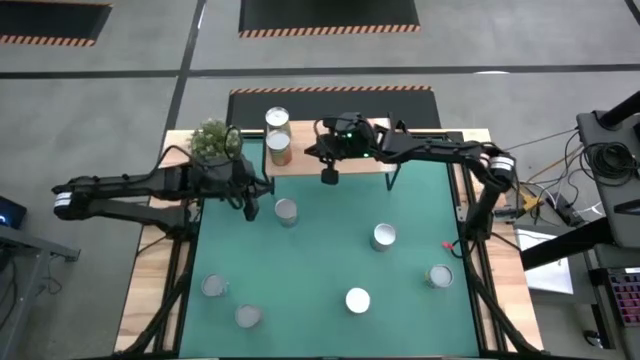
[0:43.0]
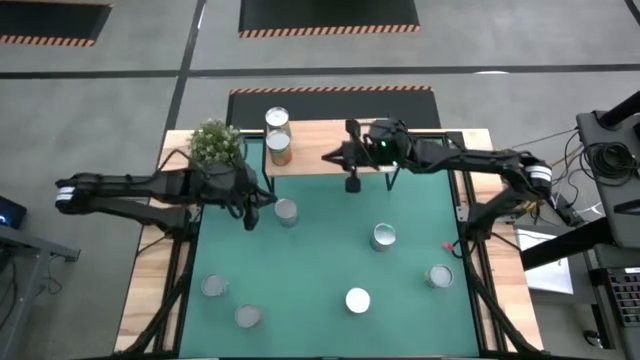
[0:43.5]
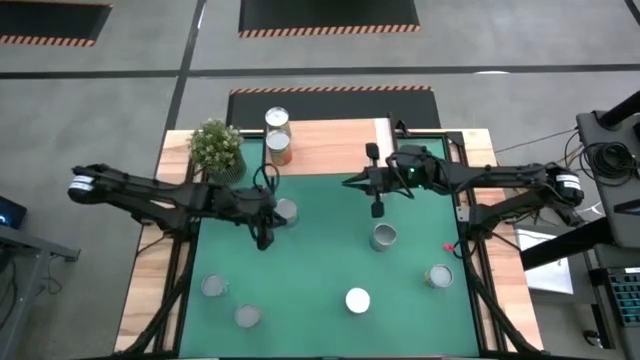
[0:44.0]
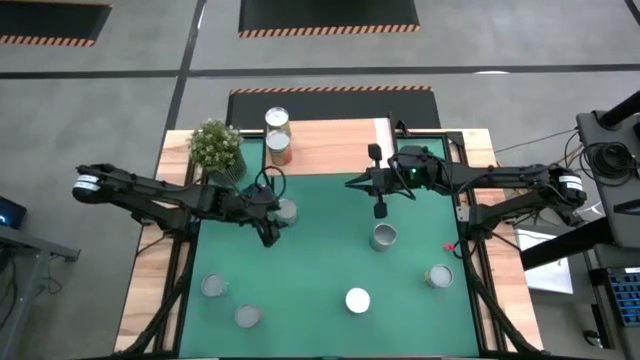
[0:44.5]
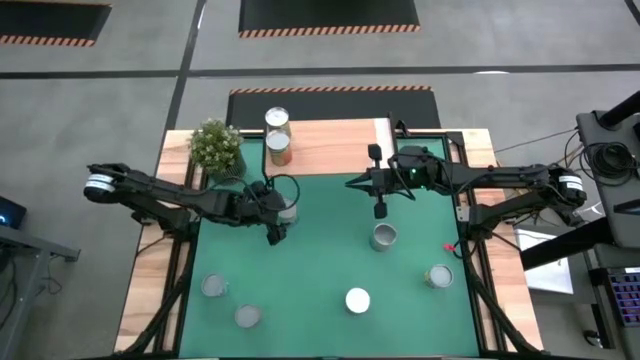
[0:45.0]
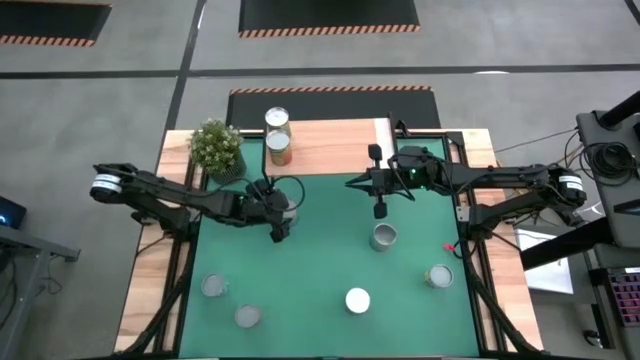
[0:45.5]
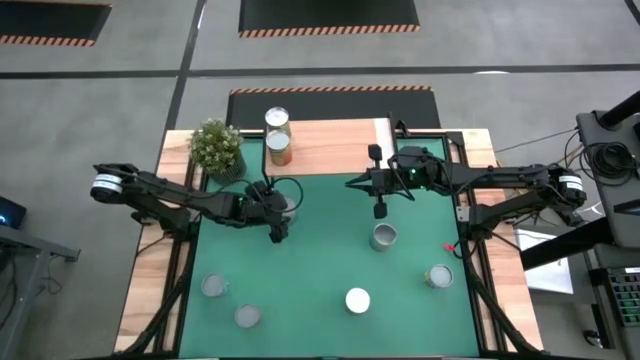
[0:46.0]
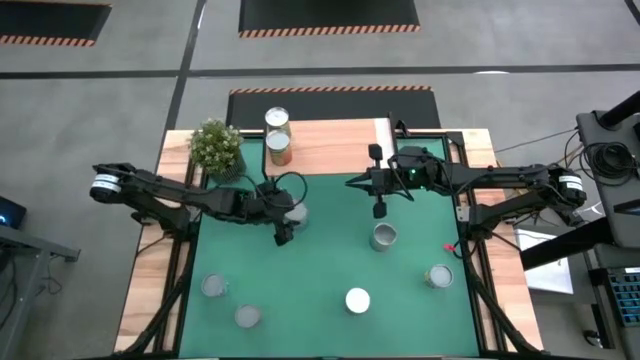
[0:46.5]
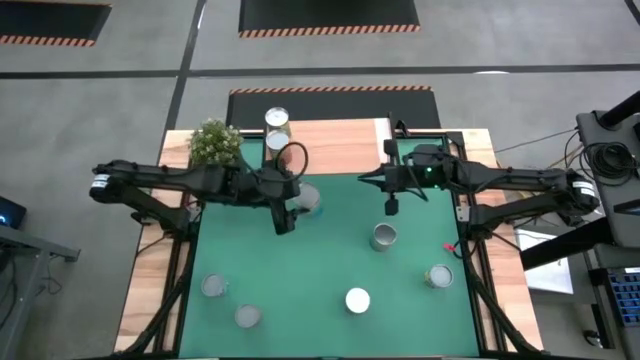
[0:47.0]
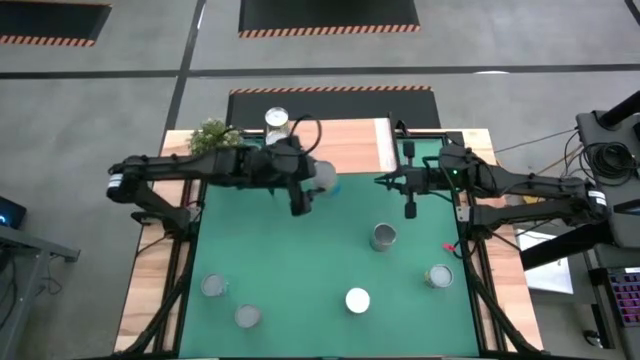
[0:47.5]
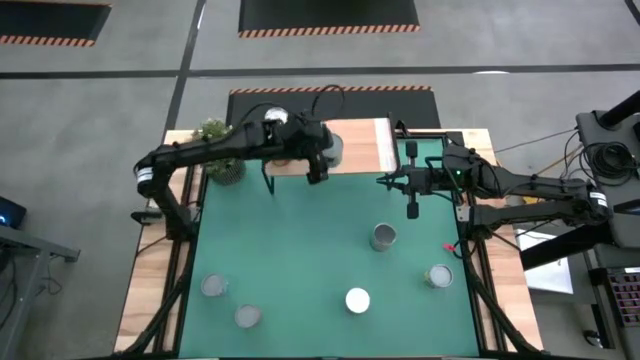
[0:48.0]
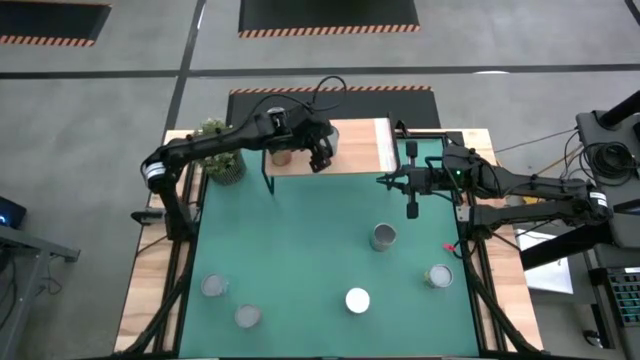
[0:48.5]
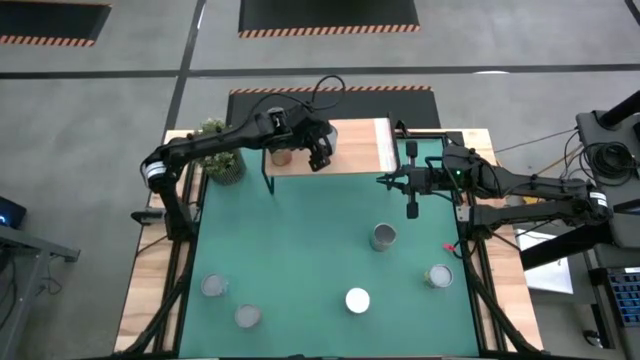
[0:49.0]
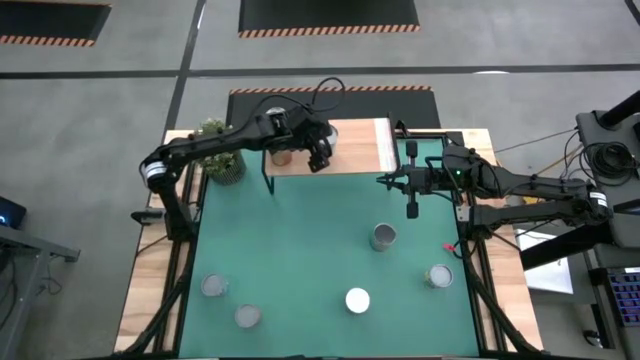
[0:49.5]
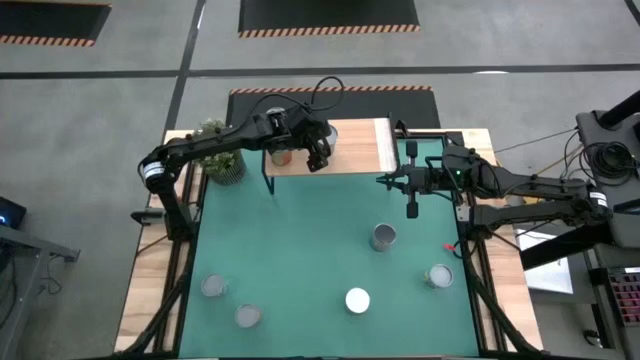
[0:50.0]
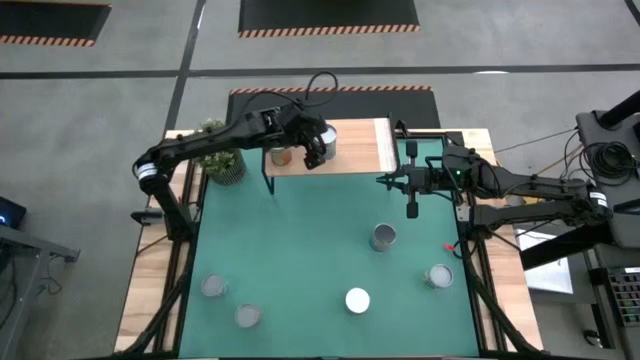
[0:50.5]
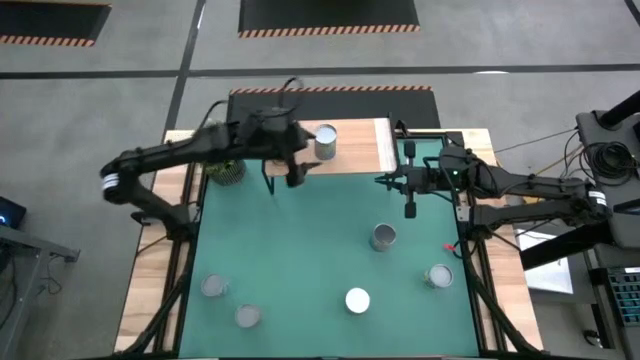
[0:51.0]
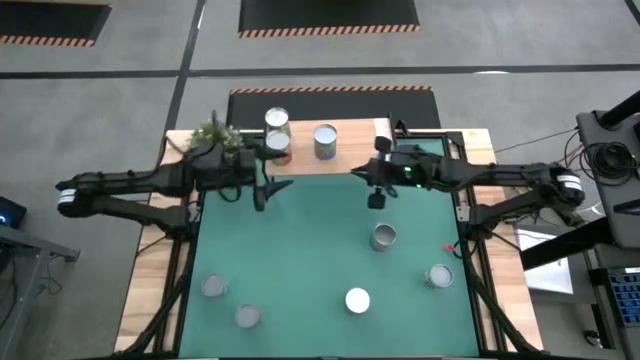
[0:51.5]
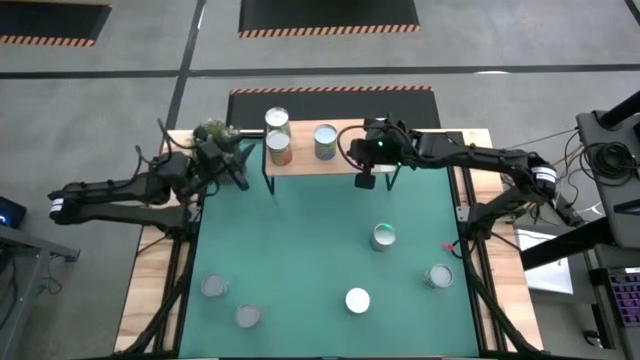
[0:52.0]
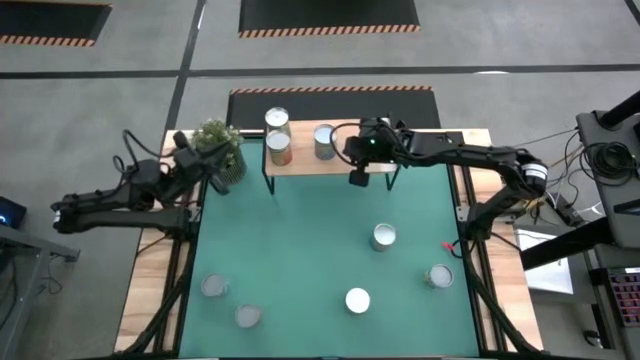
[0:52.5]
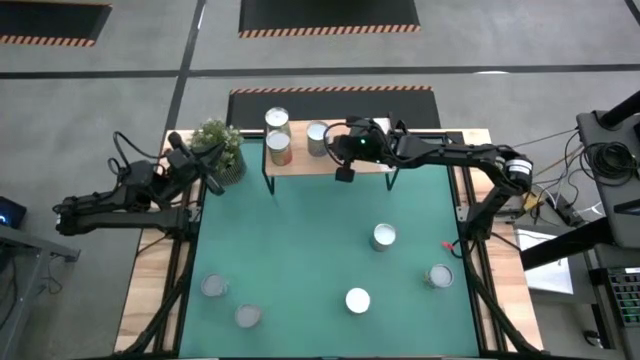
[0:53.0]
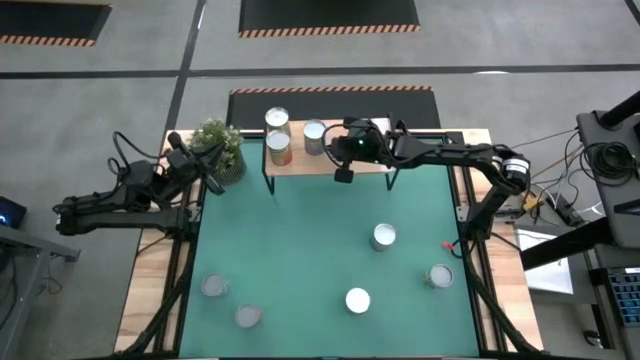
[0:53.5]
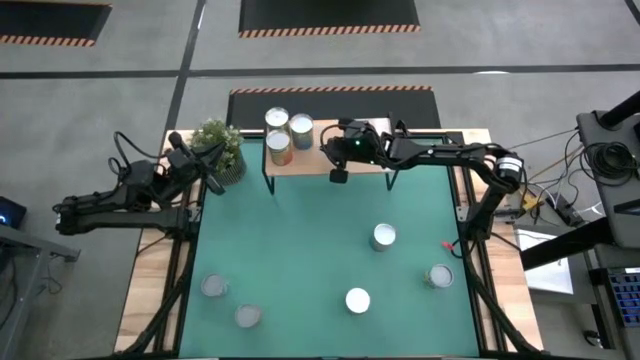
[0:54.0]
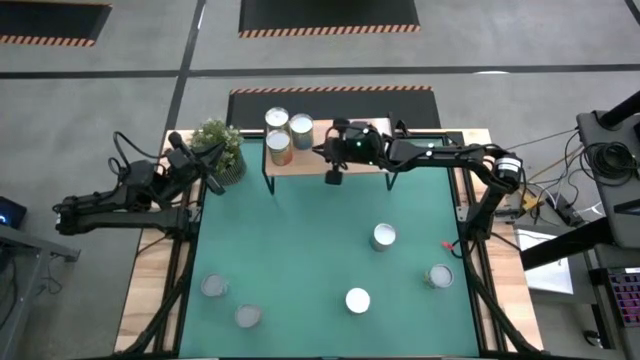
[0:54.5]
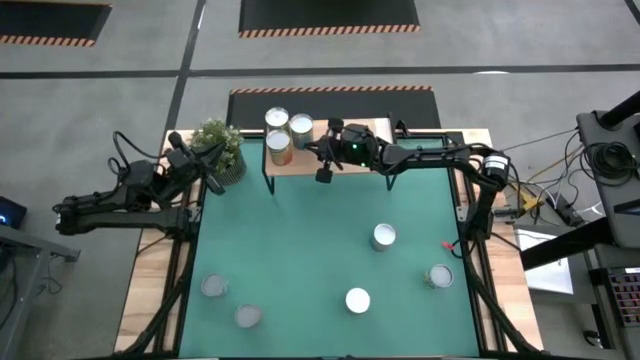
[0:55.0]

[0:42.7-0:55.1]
Task: Pick and place cans onto a shelf
Put the big canned cherries on the shelf

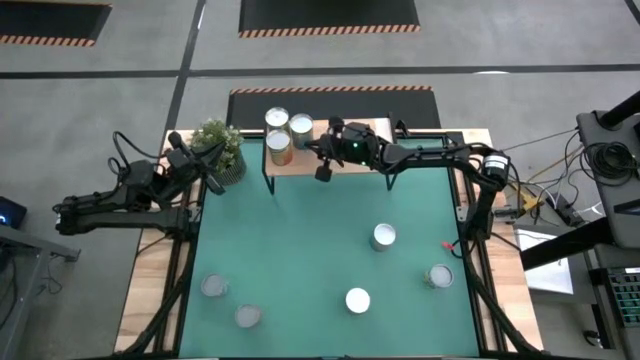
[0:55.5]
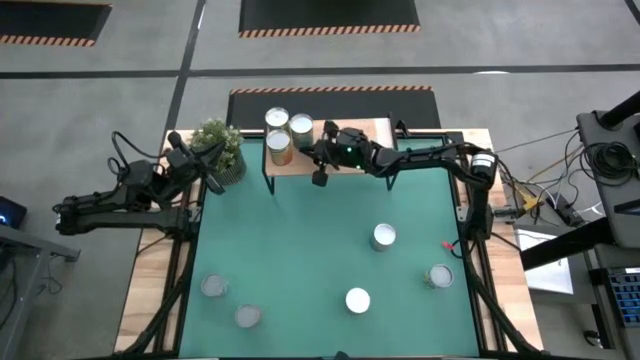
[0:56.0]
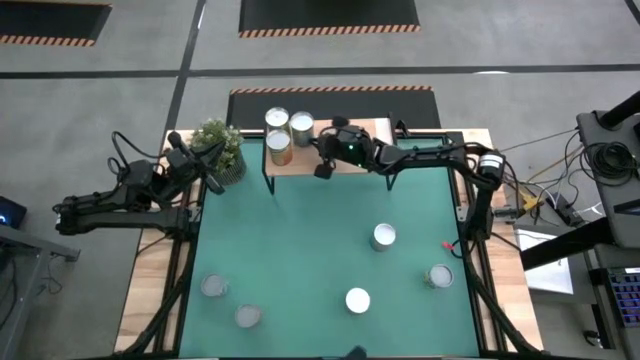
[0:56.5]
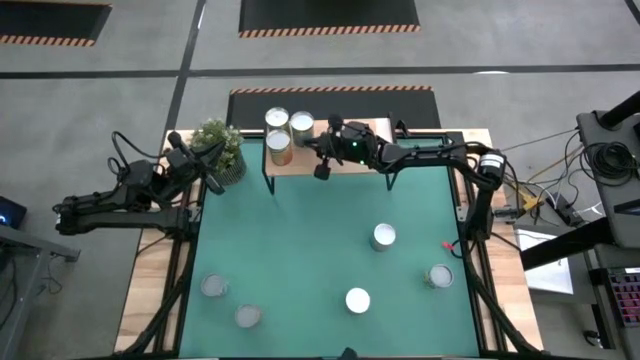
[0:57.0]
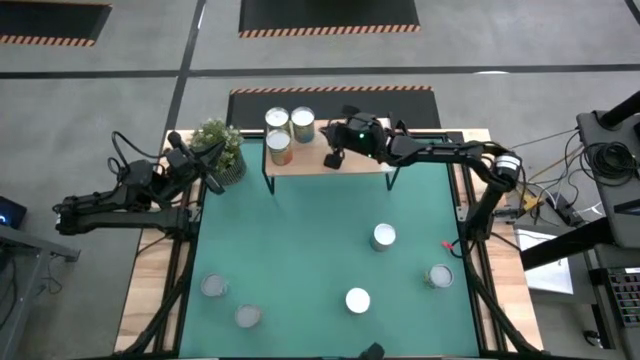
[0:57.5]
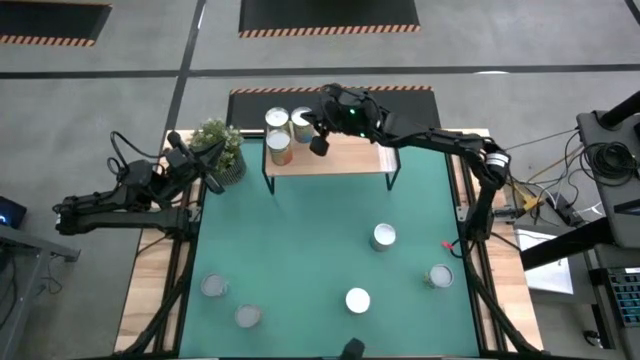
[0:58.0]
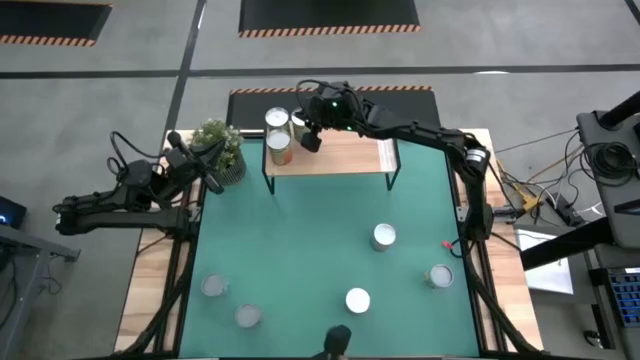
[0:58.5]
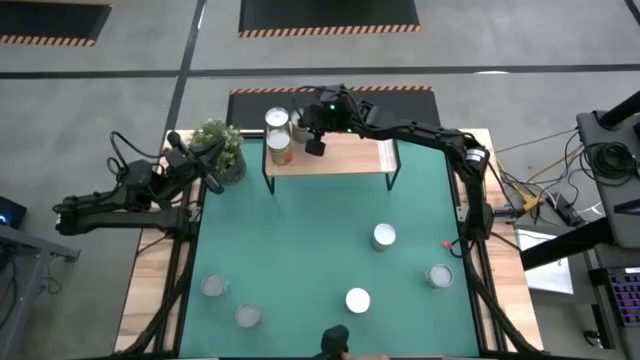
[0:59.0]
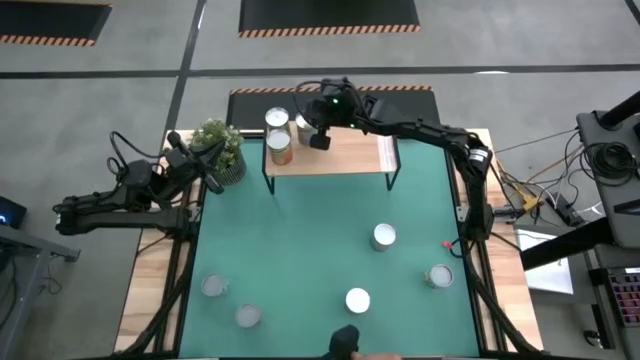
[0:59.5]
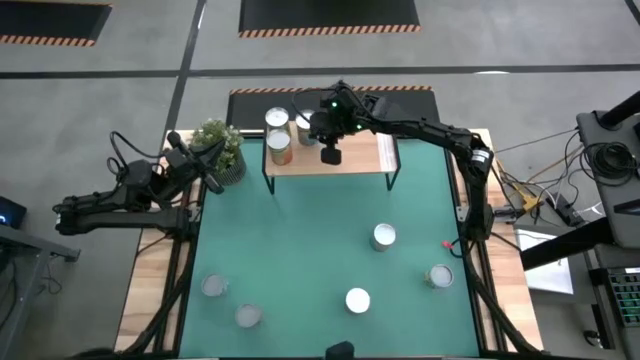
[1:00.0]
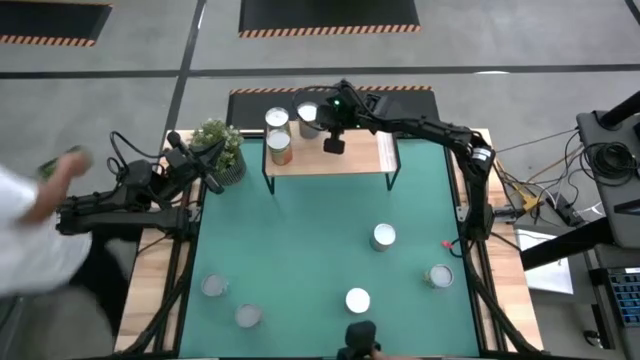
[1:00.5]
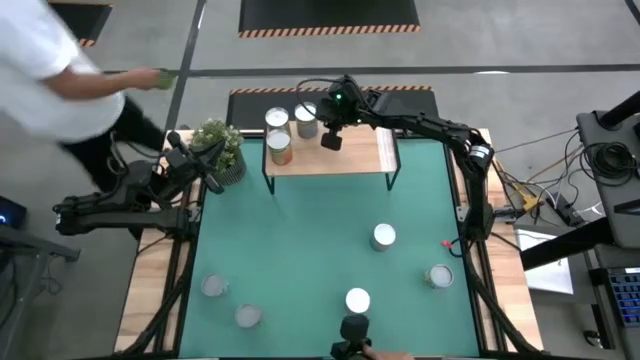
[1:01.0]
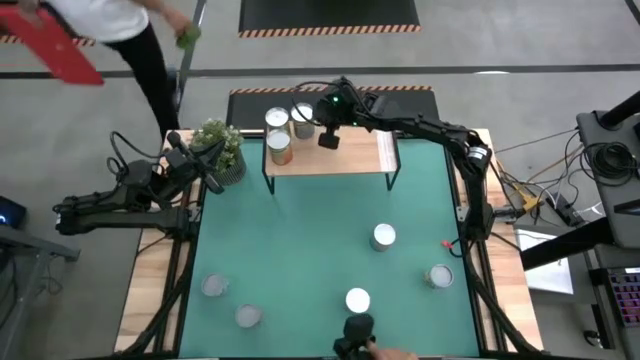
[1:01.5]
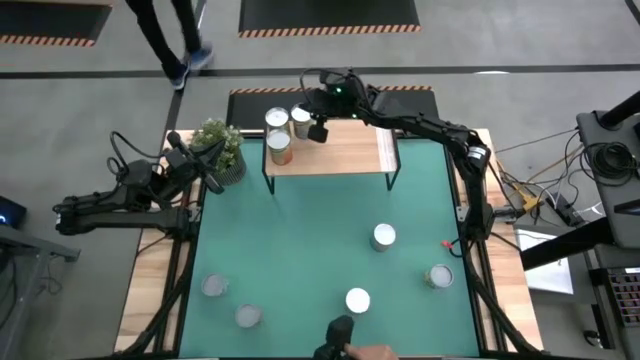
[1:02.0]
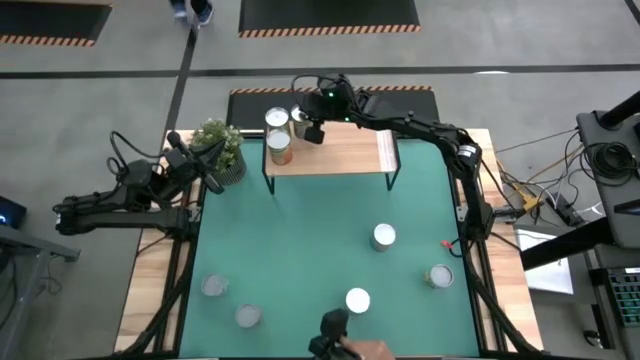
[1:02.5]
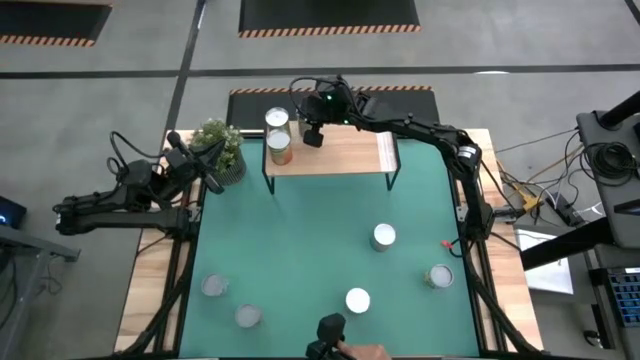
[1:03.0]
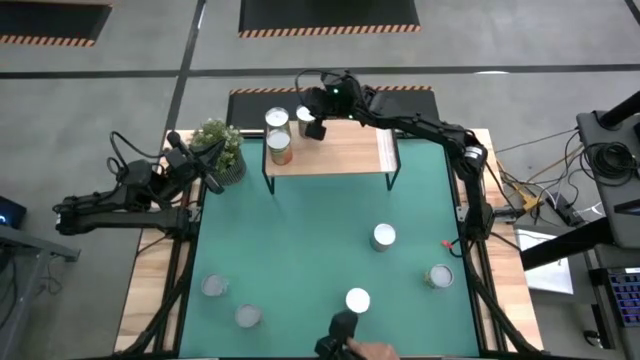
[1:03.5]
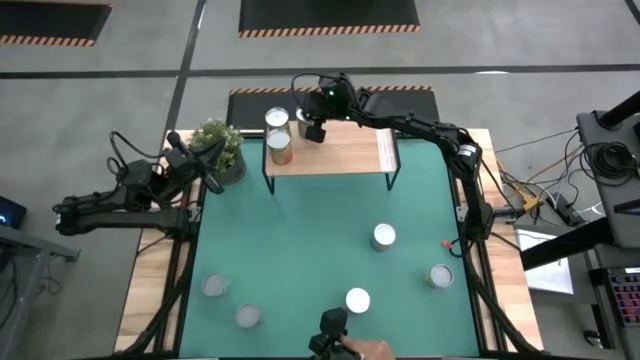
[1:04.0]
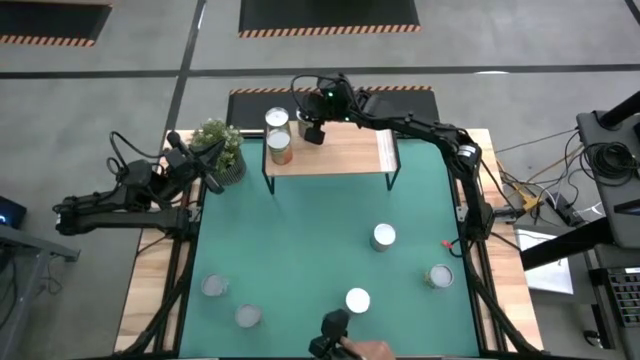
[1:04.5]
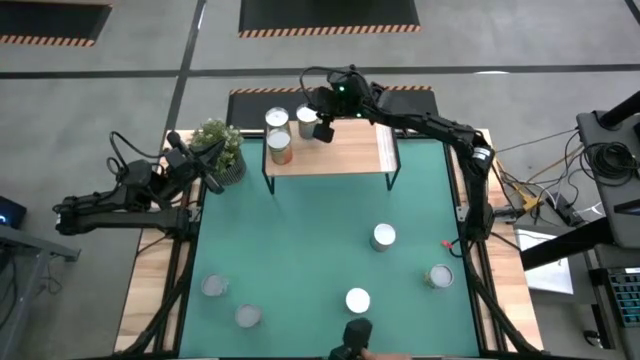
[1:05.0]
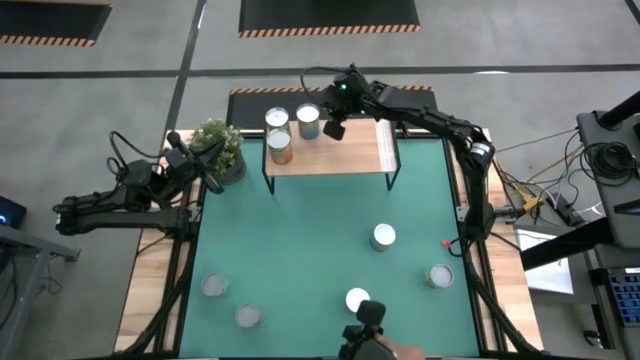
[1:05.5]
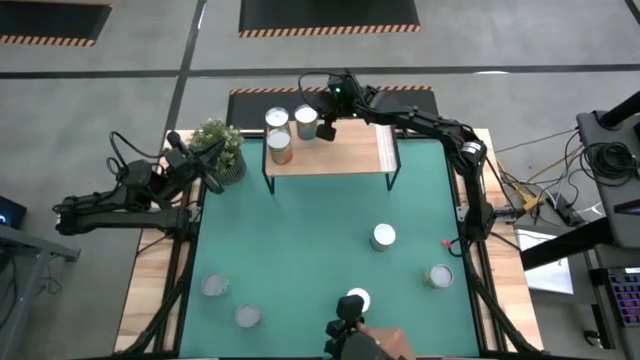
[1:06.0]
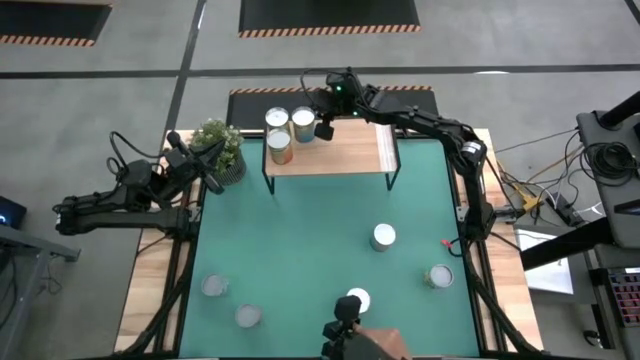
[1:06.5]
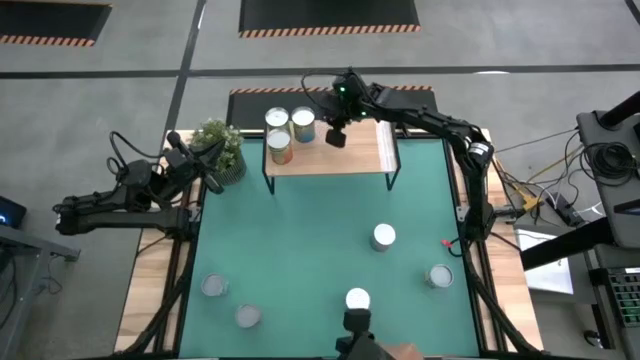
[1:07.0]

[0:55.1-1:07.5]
Put the big canned cherries on the shelf
